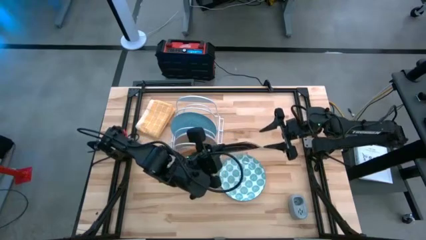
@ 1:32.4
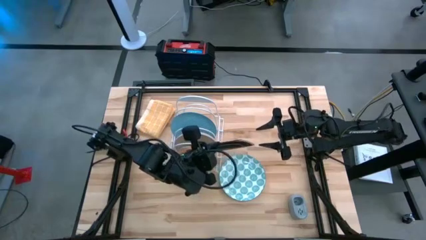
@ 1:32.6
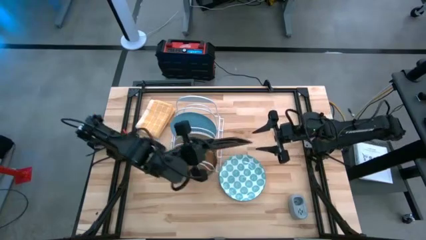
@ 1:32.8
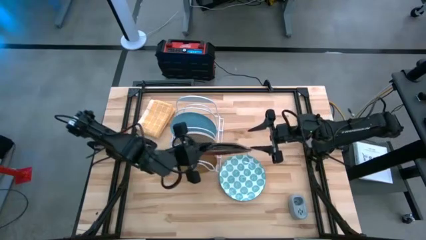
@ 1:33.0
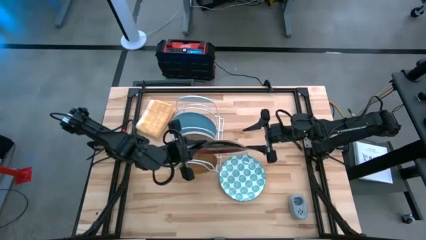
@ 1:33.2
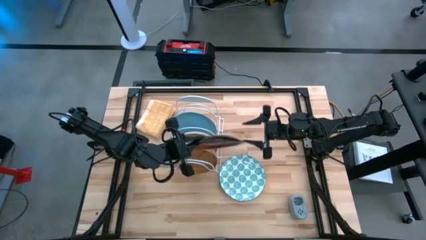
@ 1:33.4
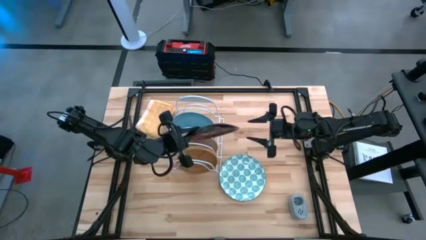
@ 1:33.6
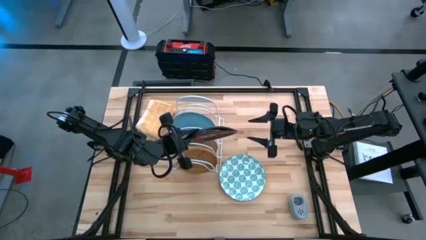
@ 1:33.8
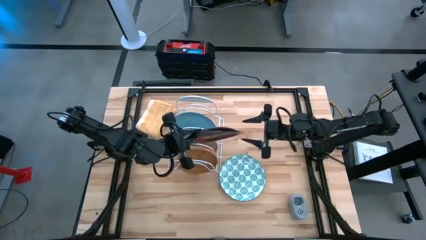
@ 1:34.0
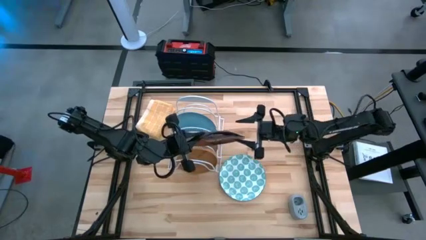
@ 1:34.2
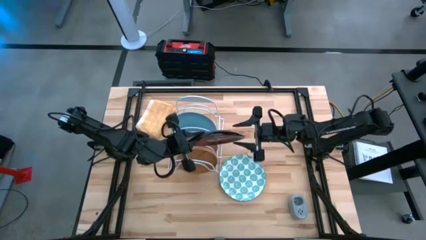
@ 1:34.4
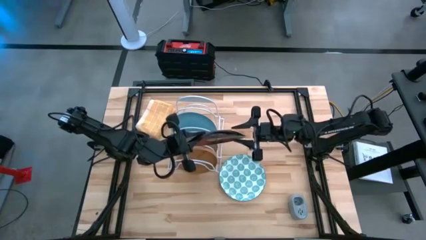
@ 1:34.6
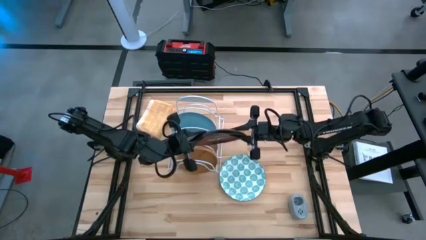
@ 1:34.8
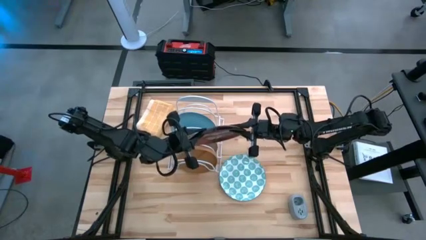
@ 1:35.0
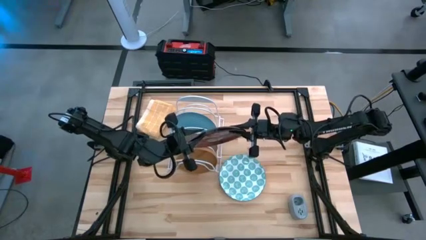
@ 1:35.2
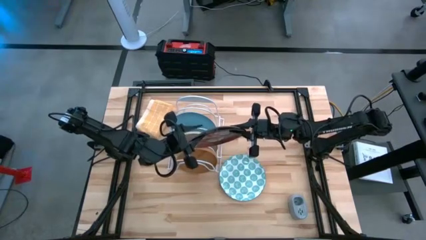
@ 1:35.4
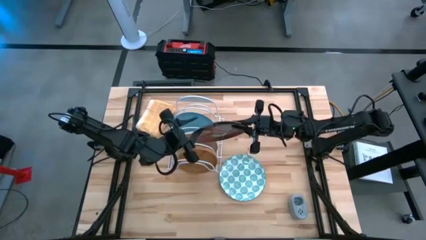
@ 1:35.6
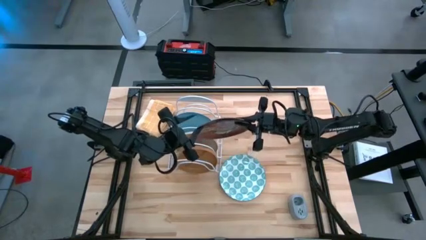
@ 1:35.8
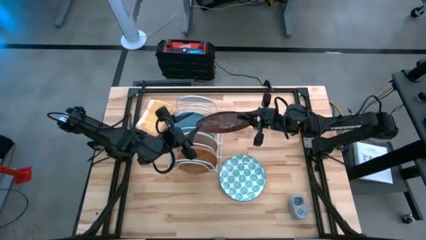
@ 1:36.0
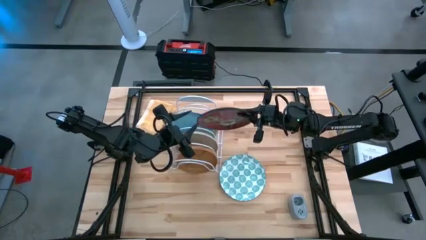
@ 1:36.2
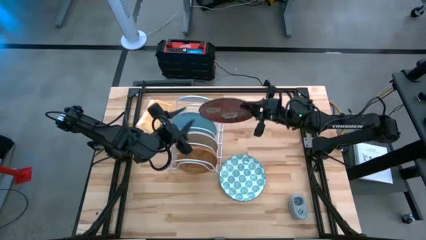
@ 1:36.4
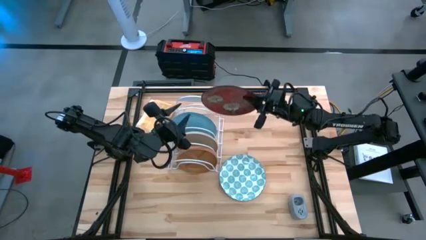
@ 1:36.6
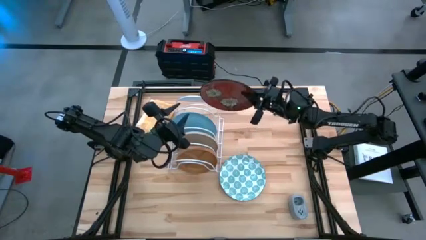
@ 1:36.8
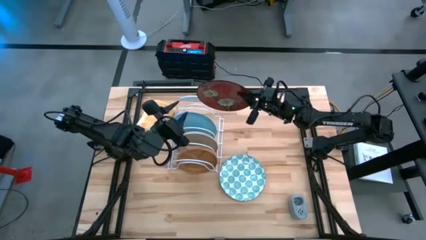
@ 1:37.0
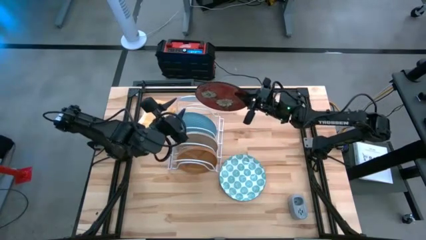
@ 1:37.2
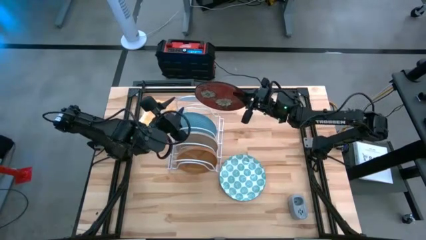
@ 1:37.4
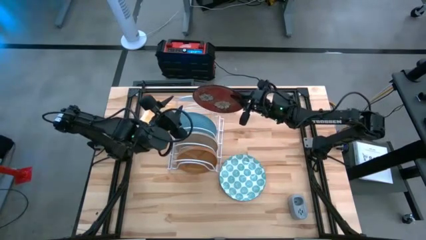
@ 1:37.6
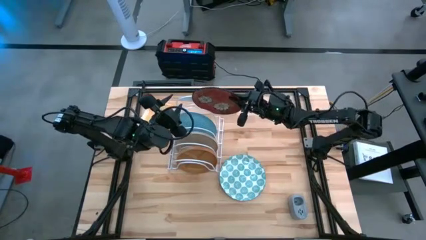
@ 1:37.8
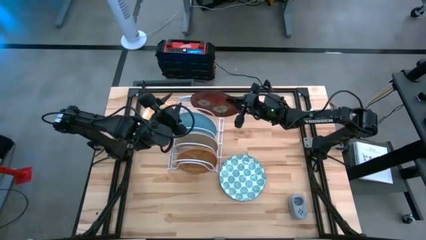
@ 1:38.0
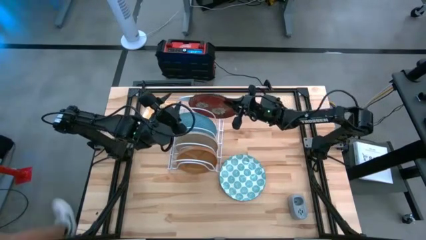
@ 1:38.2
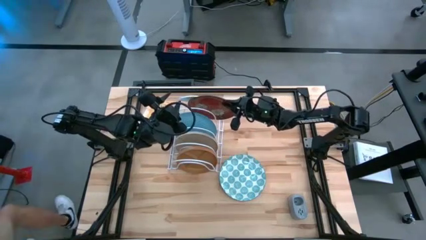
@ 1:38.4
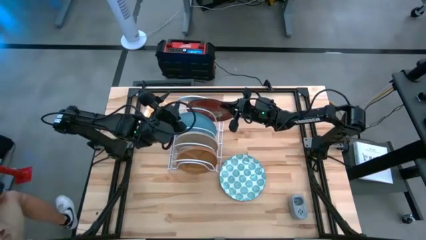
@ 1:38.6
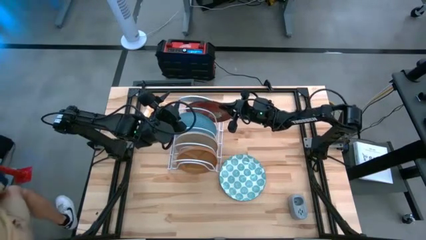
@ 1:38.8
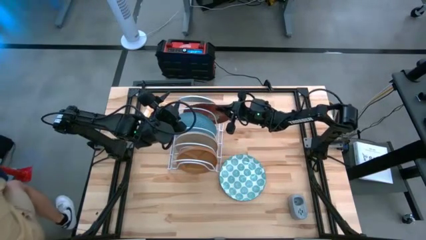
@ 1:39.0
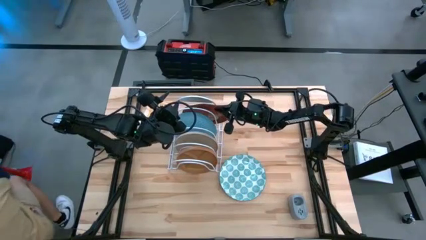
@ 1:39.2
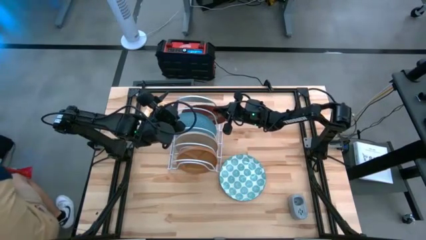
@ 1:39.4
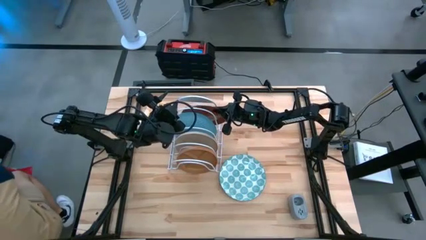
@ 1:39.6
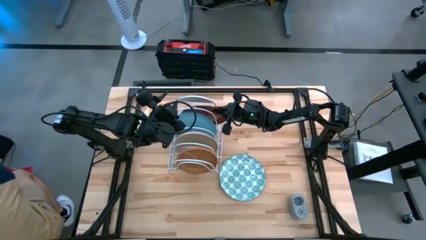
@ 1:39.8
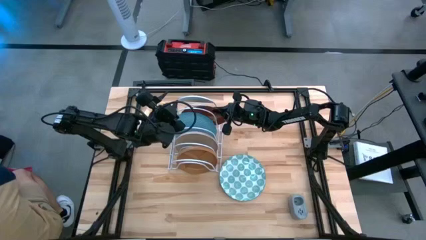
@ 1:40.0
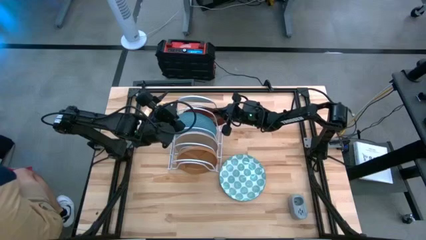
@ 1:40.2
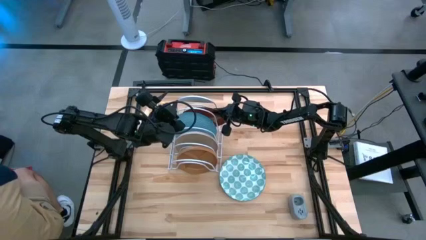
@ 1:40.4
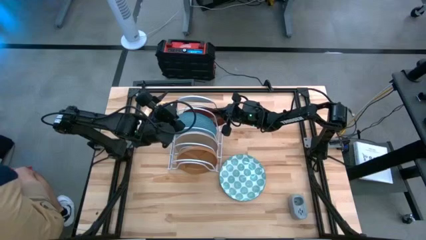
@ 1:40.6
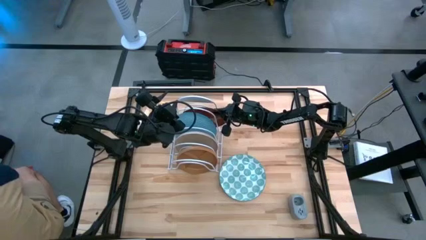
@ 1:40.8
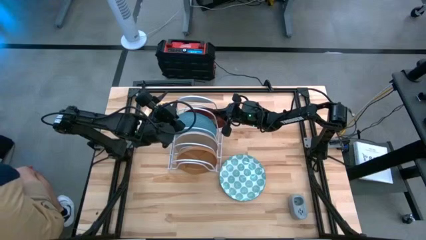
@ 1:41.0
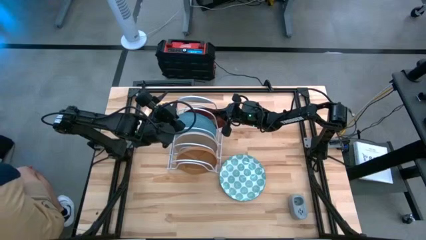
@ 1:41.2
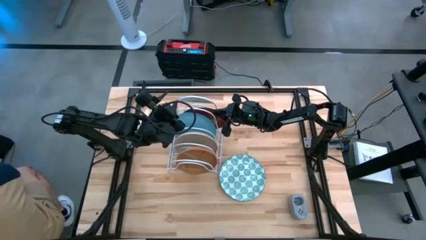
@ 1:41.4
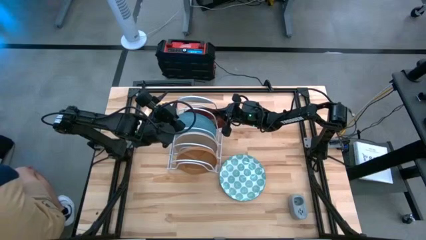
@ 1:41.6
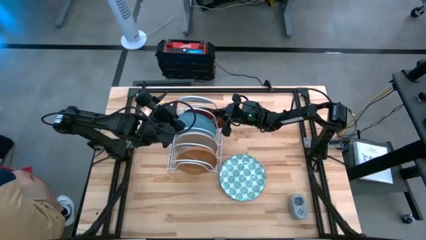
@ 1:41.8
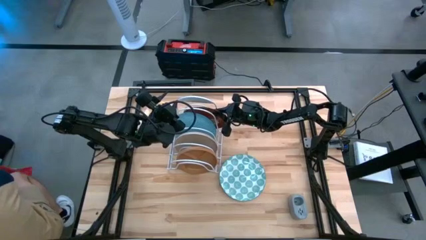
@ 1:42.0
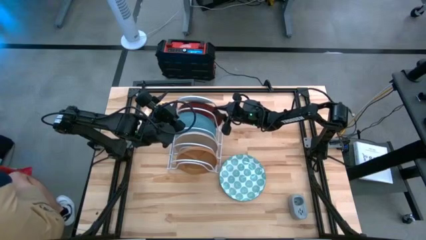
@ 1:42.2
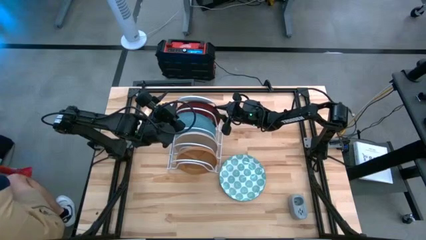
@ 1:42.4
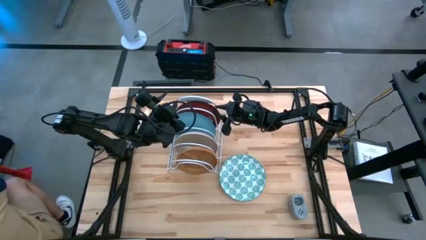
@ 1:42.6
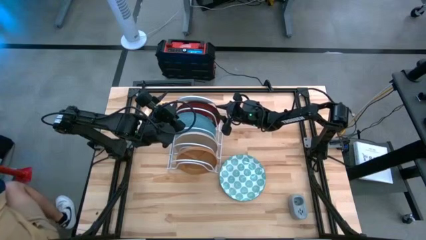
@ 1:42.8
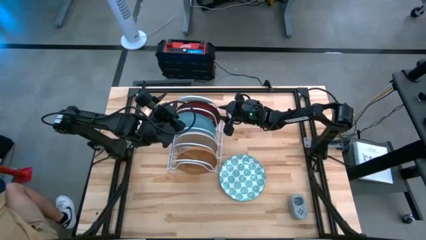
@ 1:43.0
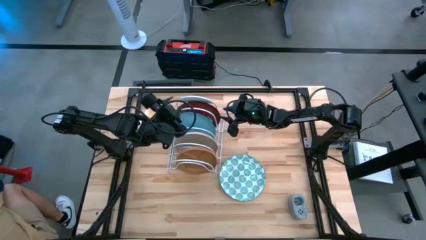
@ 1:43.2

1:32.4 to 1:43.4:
Task: Sort dishes
Put the red plate into the dishwasher rack

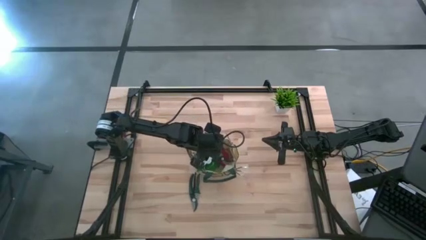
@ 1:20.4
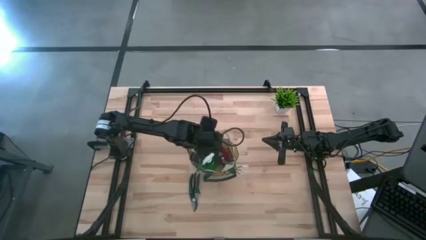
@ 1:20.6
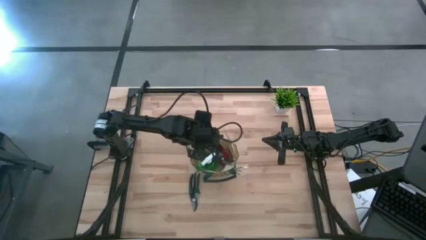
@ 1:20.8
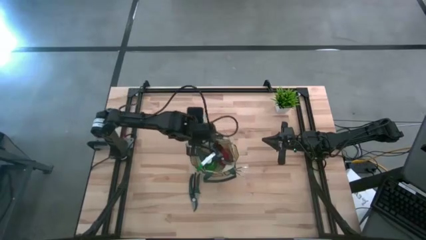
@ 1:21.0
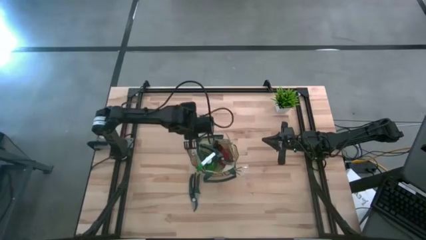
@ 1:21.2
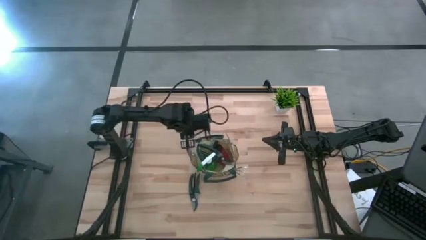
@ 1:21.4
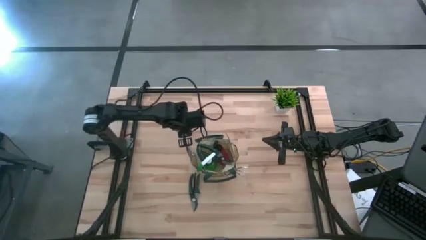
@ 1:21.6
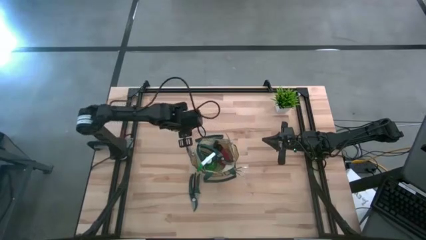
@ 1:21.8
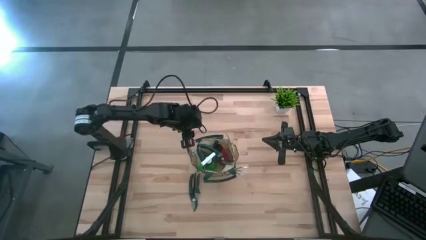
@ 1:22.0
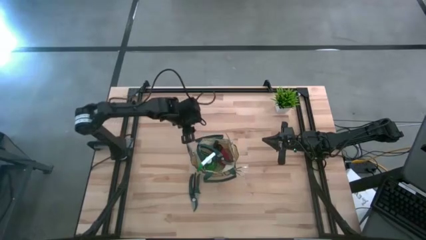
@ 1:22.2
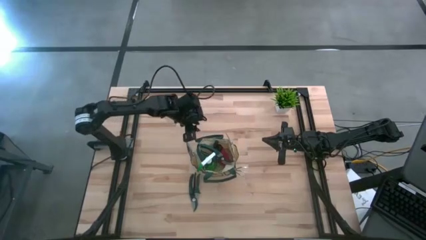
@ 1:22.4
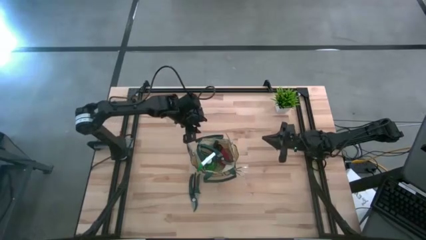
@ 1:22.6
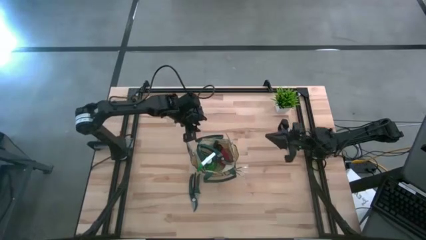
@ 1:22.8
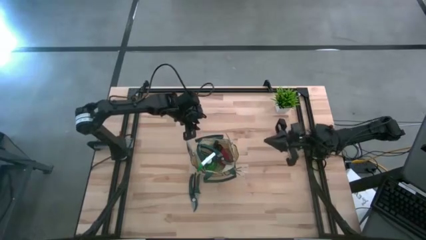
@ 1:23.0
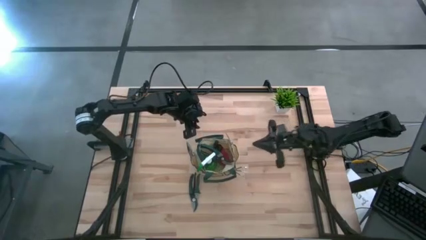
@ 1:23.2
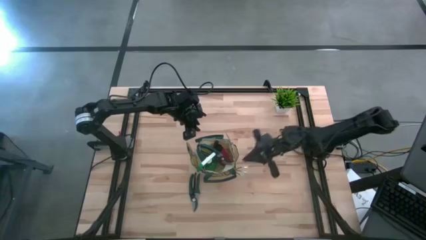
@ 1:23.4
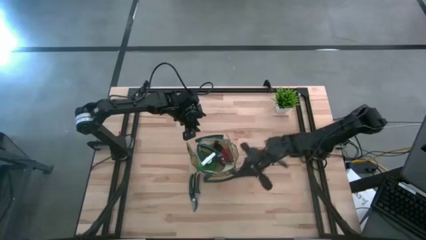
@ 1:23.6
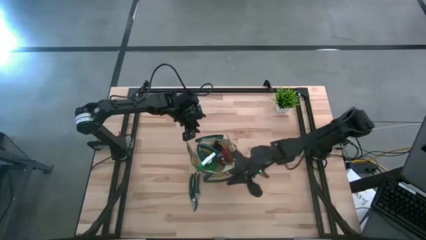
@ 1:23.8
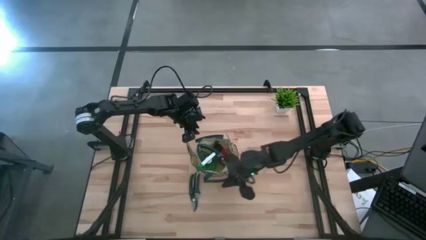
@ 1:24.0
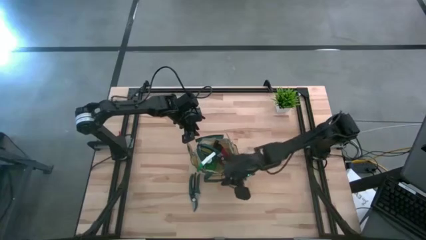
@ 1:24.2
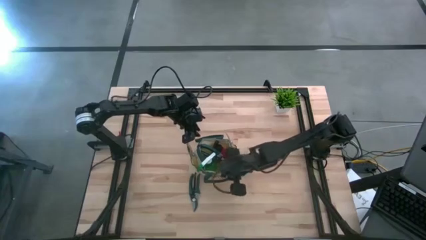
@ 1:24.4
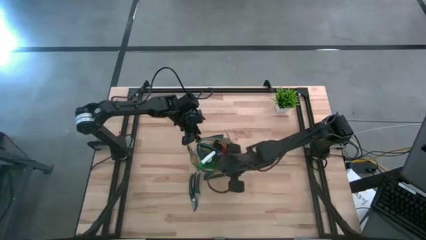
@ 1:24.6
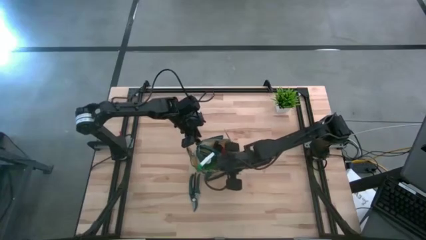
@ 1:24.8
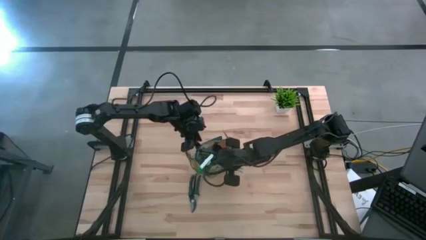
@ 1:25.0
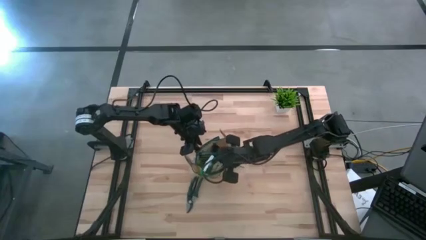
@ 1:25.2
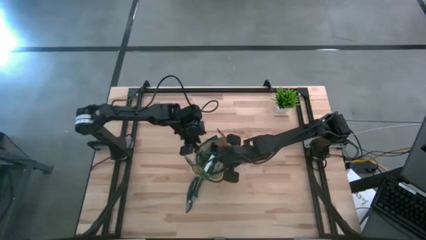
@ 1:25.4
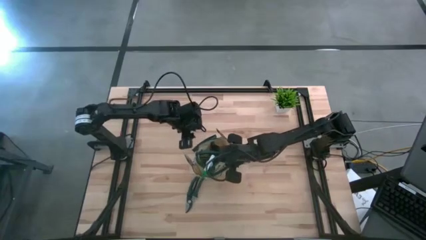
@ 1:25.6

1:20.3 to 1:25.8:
Task: Pick & Place Garden tools in Gardening bag
Adjust the white gardening bag
